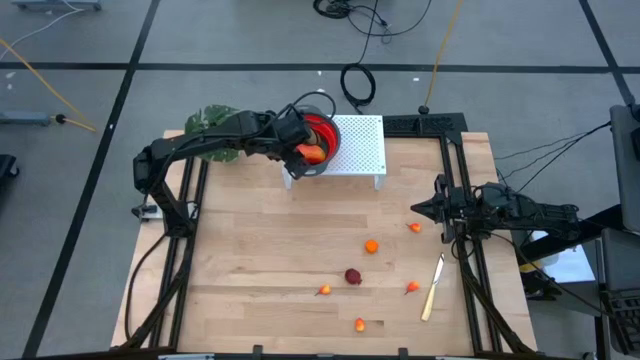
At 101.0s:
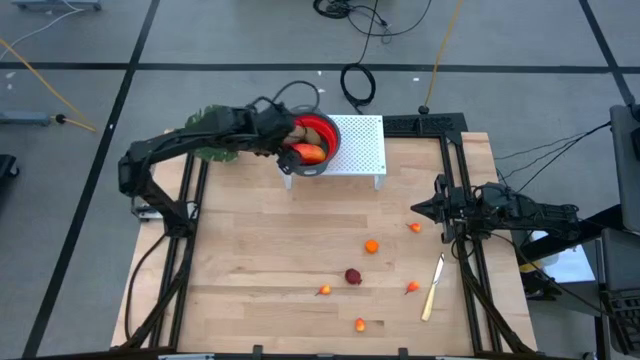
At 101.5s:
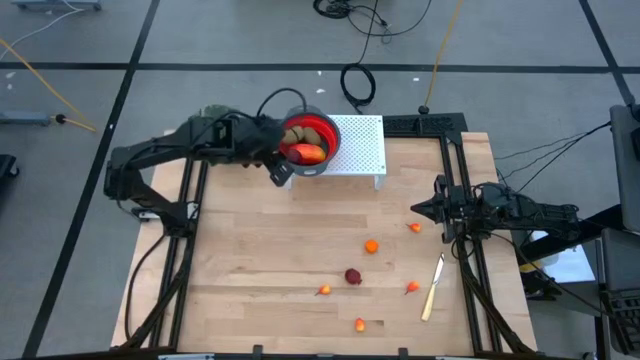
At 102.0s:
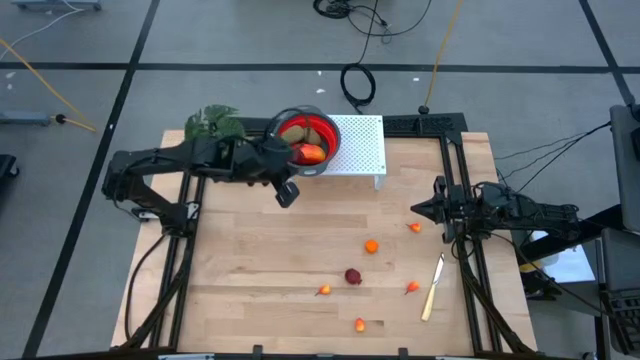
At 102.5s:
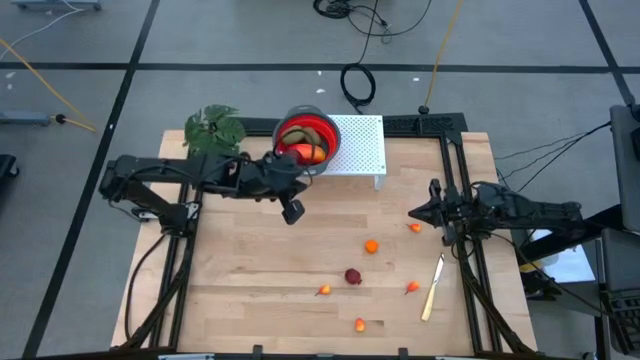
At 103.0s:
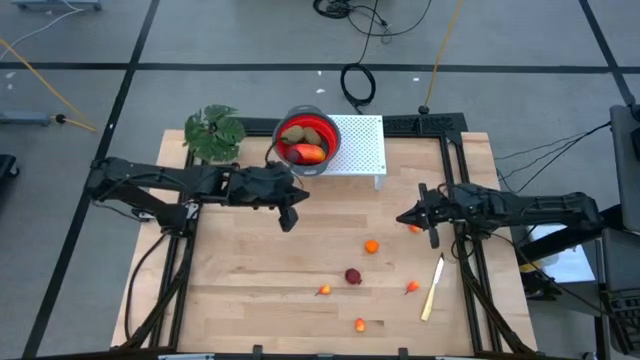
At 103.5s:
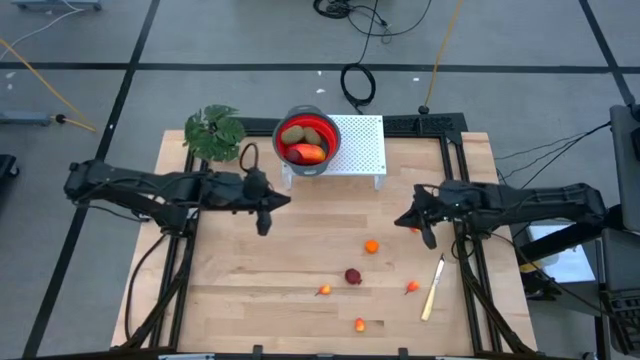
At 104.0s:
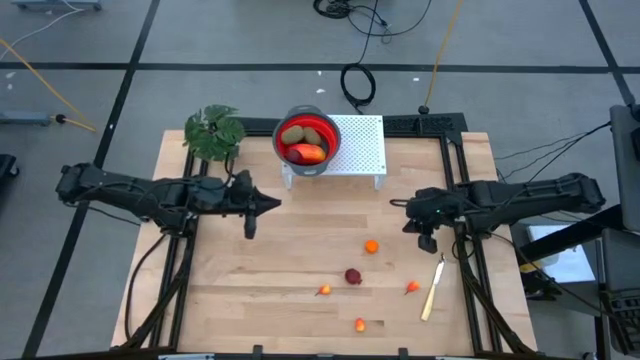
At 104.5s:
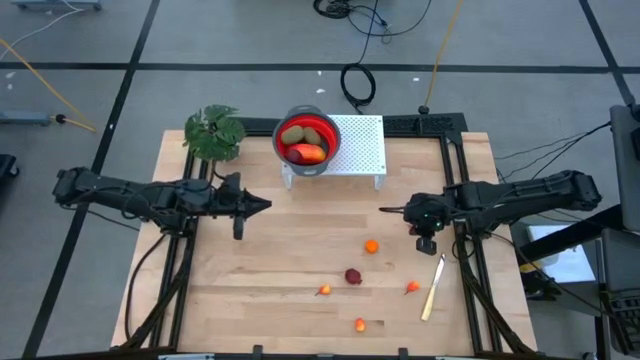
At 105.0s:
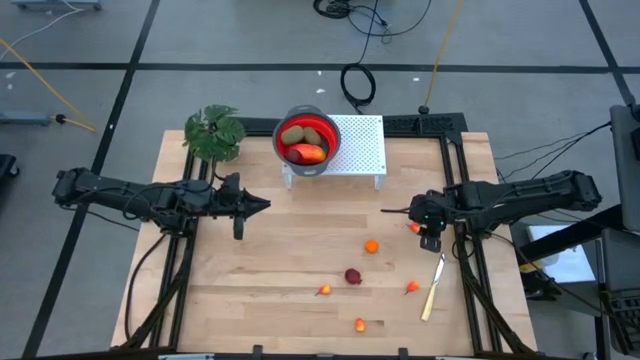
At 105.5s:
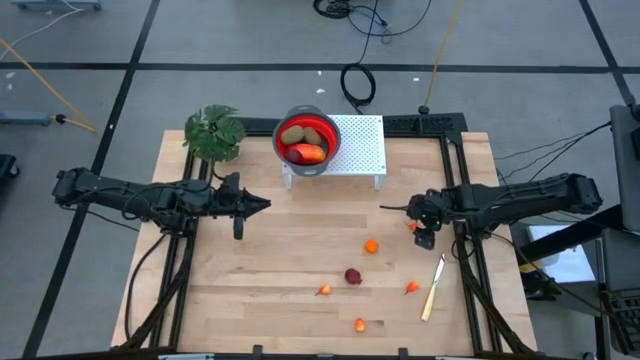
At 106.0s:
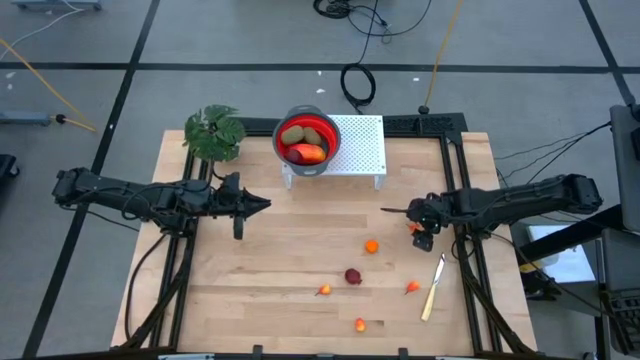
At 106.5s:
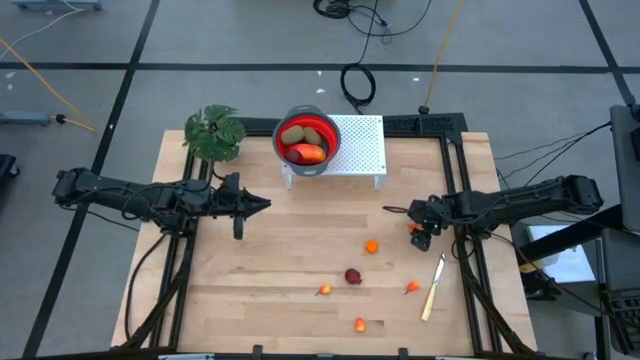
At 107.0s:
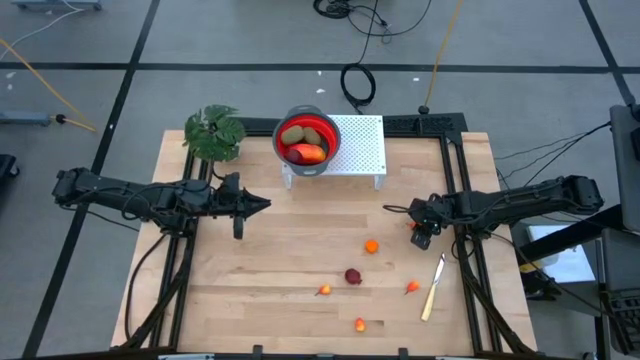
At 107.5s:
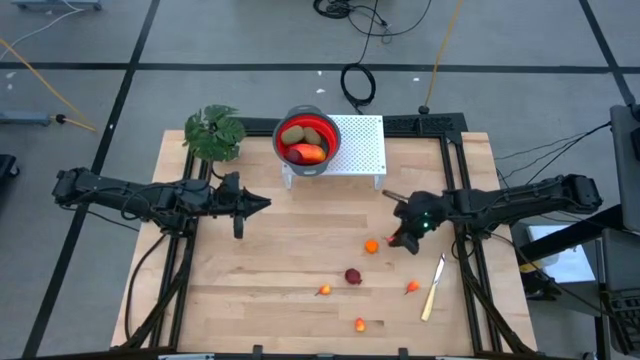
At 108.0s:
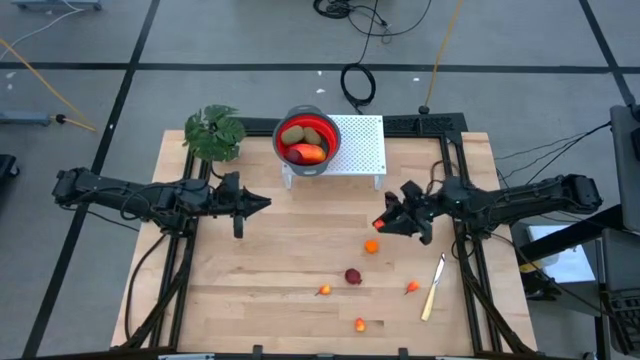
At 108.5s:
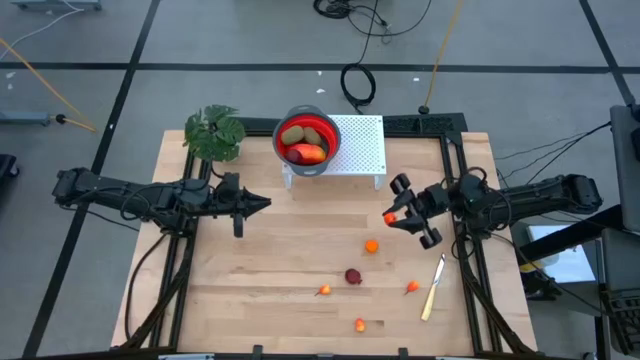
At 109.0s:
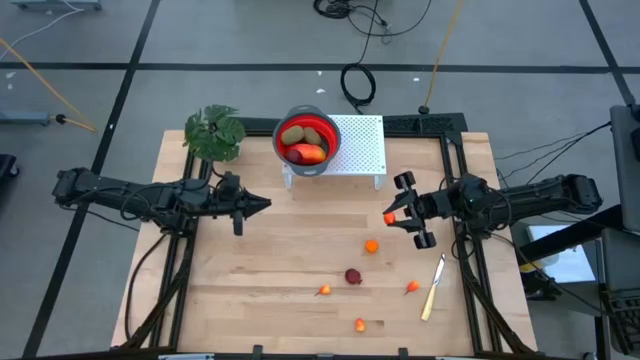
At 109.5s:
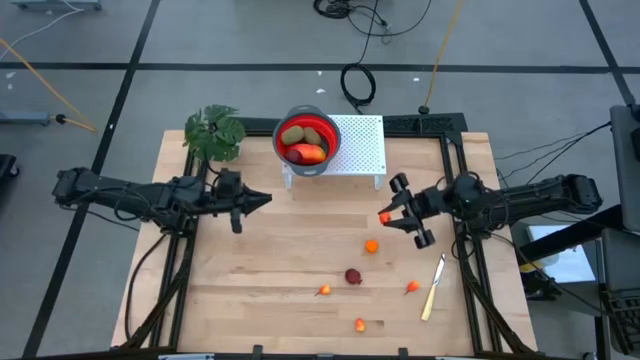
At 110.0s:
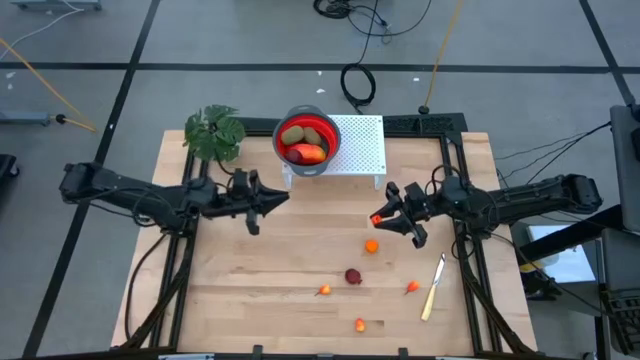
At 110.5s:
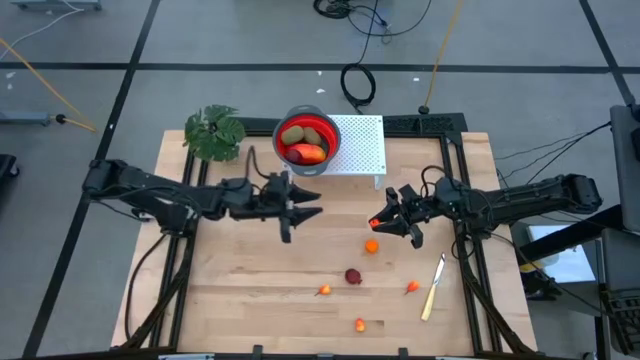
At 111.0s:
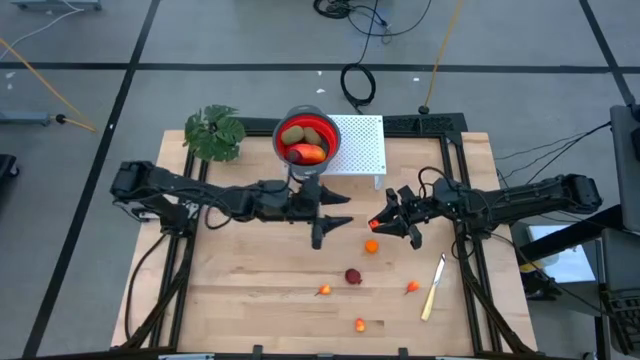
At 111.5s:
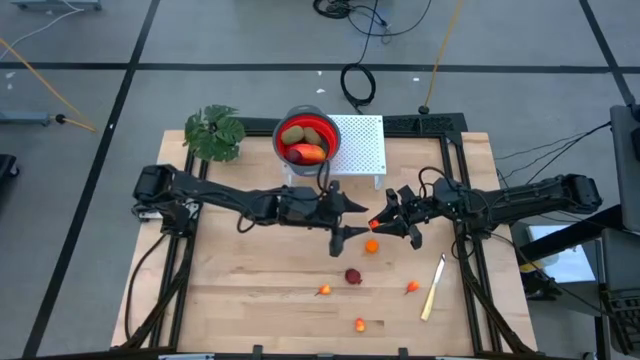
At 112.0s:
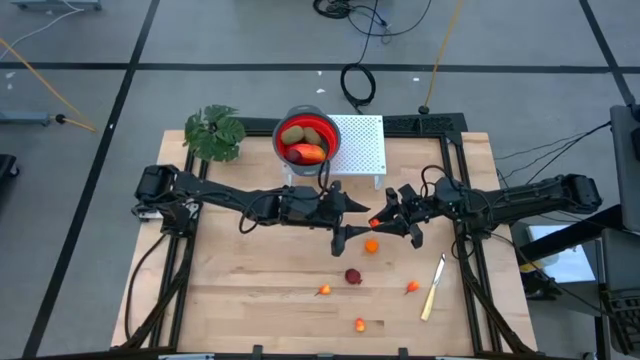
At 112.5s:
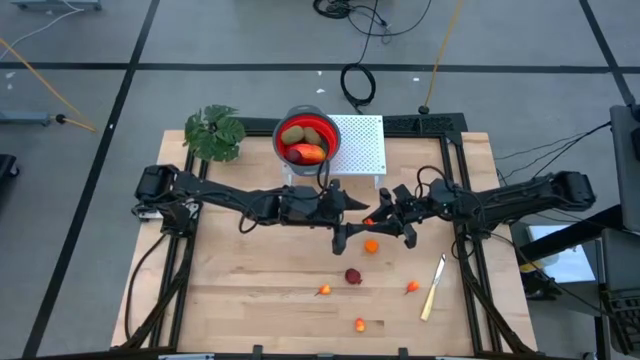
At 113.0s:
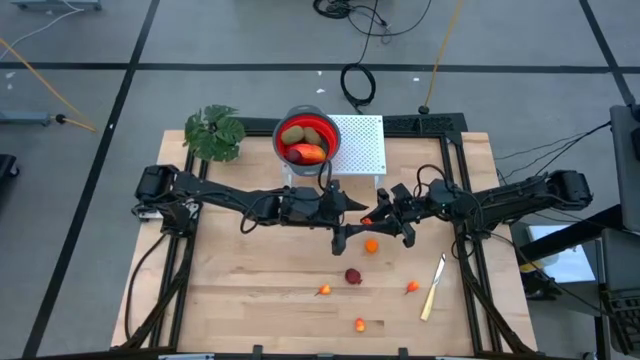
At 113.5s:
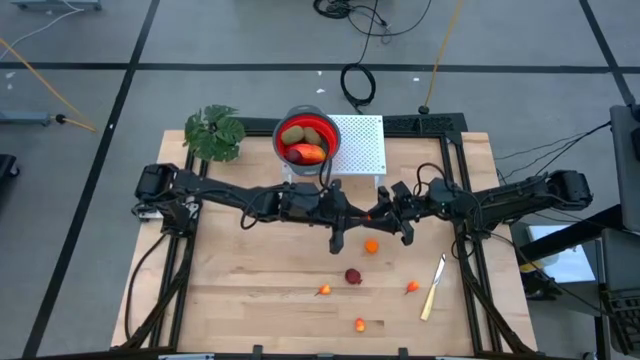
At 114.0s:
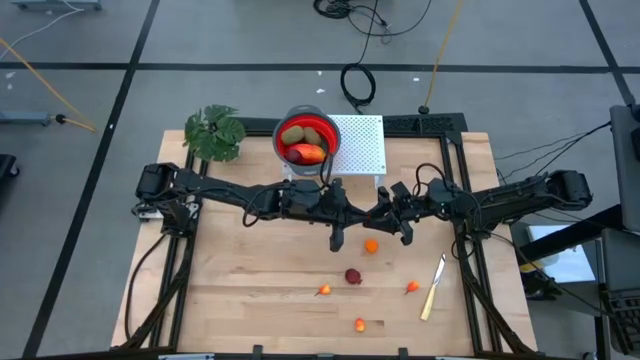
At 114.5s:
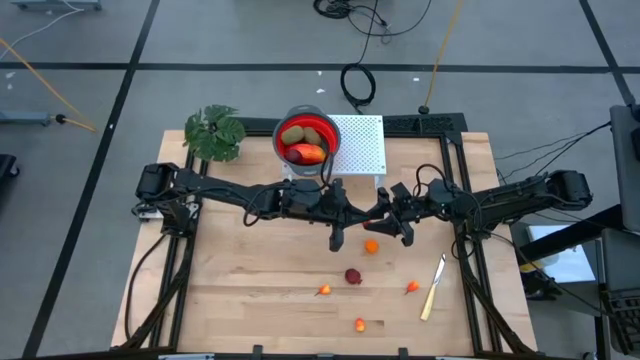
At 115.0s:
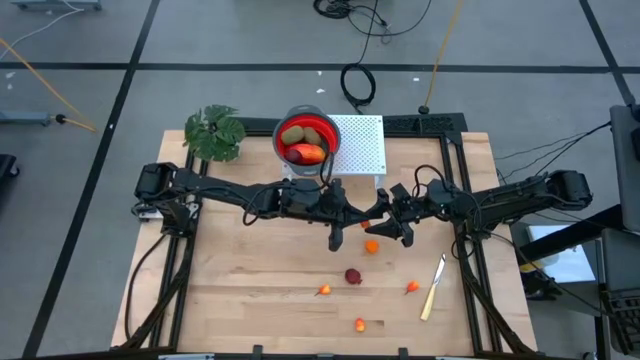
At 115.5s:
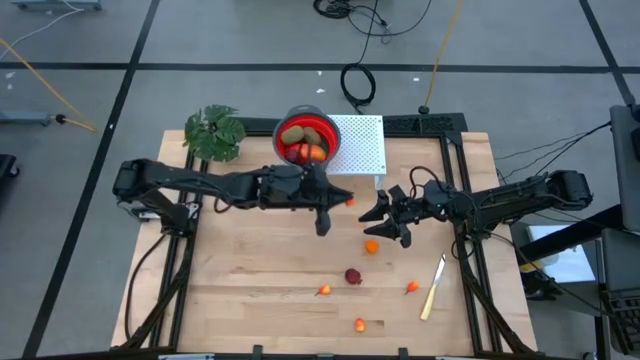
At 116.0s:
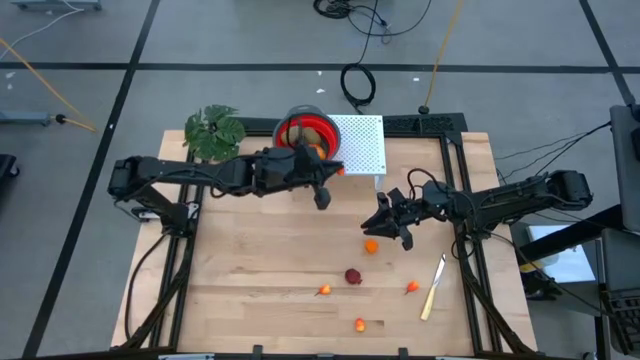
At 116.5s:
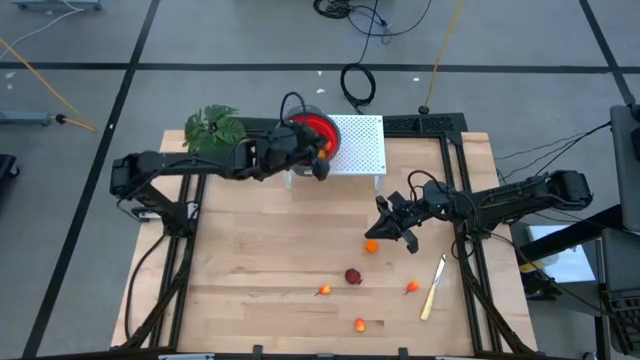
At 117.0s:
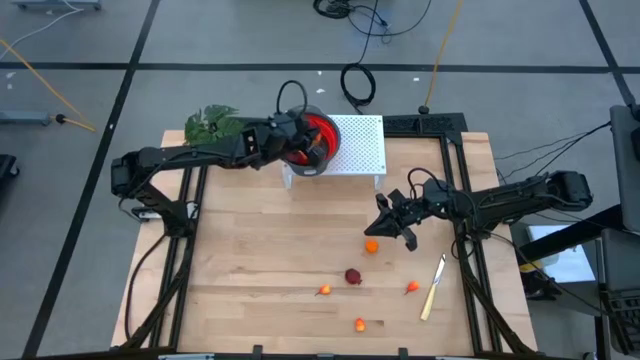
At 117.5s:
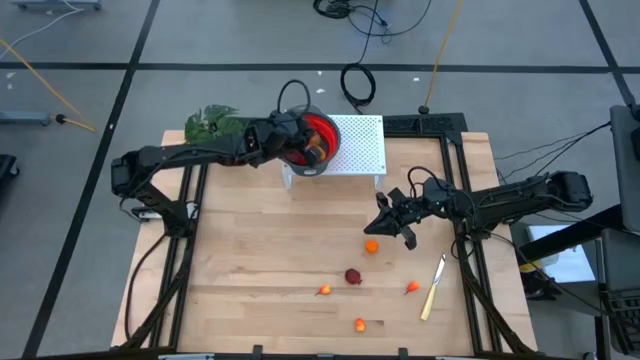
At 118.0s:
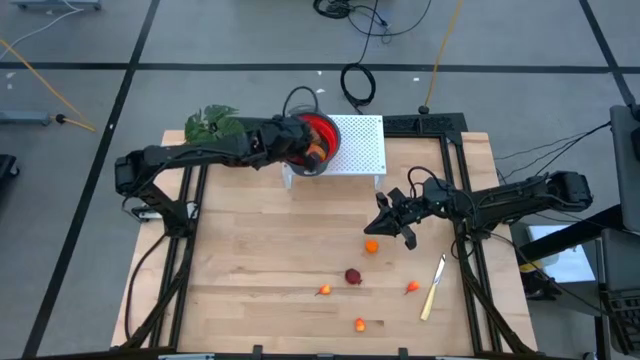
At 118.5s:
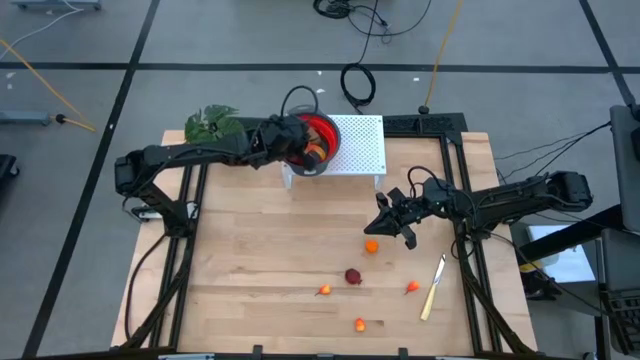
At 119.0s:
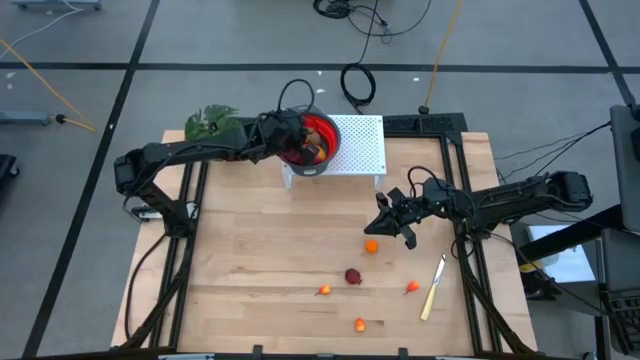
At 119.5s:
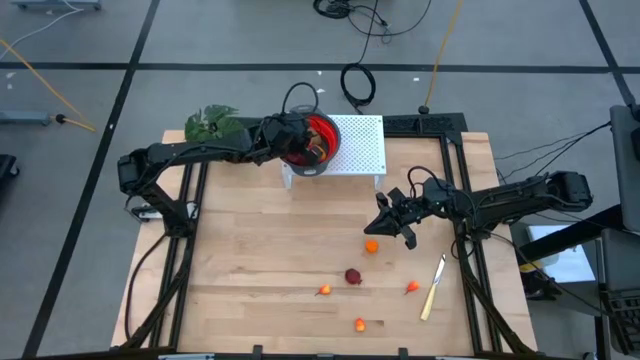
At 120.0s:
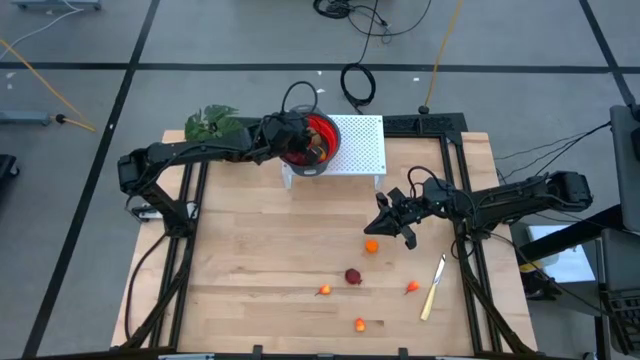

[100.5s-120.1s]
Task: Pick & Place Fruit
Put the top right peach into the red strainer bowl

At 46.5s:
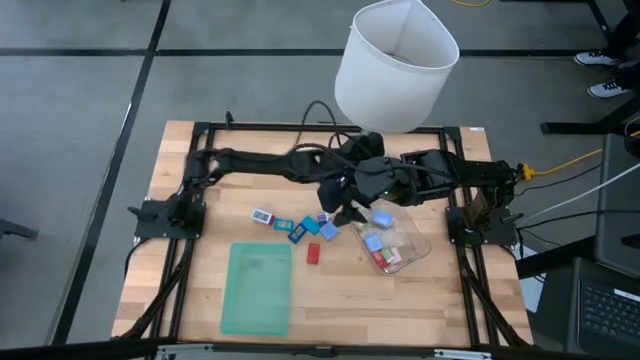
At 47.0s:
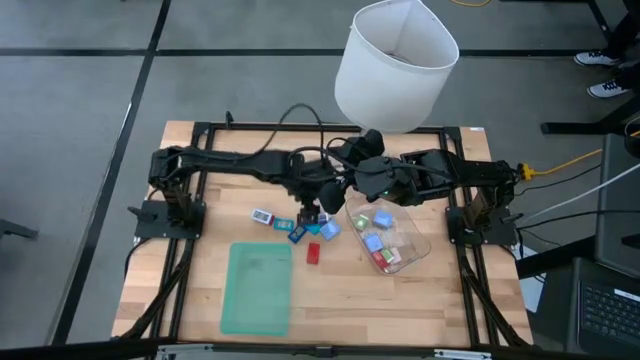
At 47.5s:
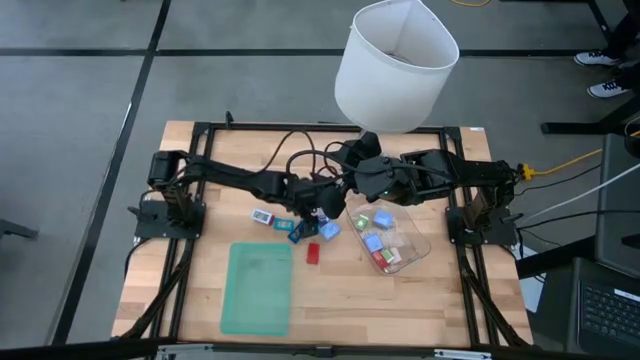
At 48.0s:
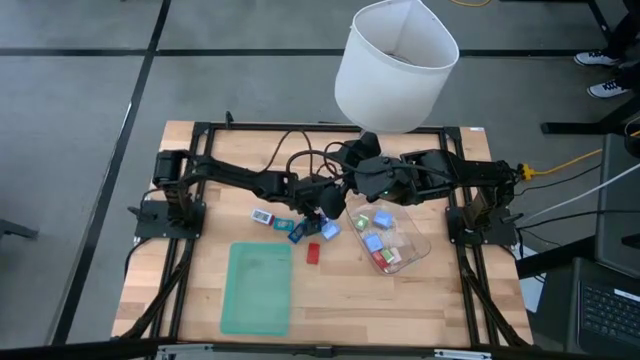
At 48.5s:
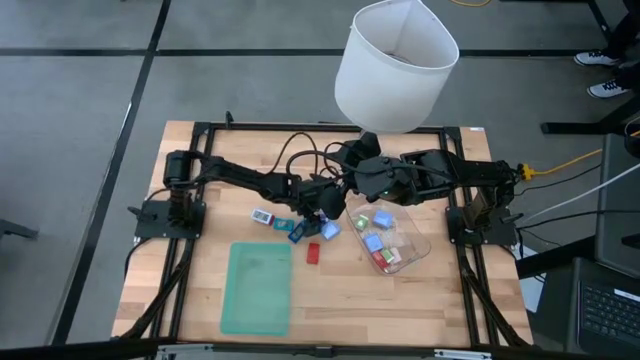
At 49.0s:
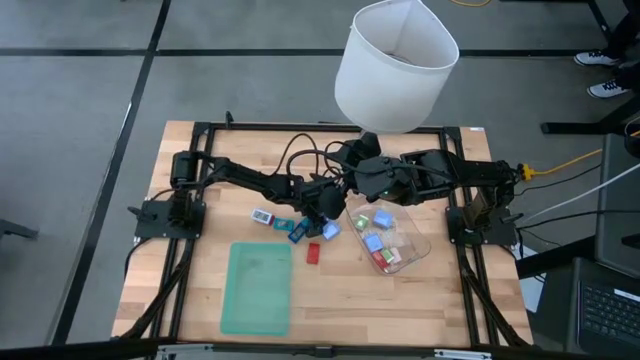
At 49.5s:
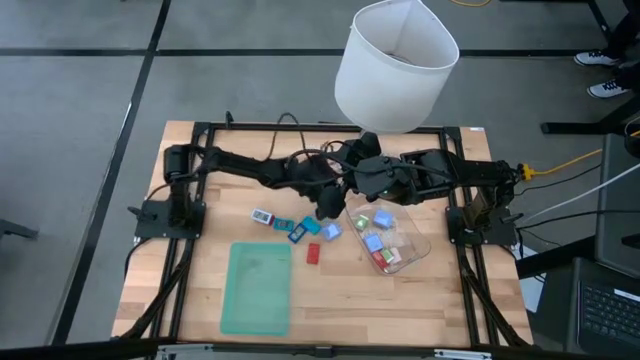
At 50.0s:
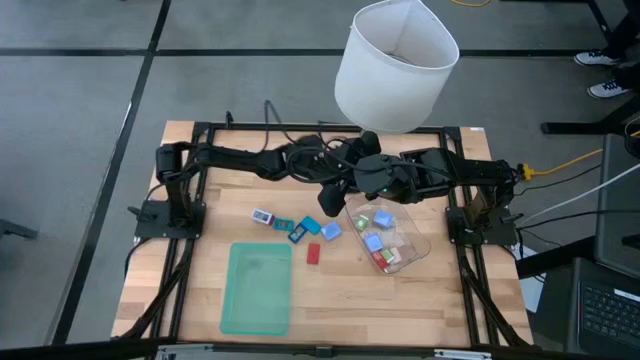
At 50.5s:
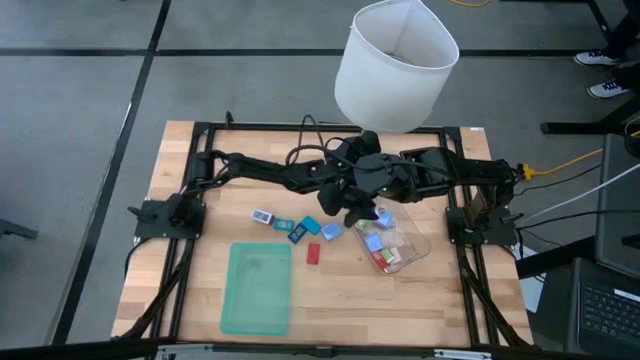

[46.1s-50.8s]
Task: Pick & Place Office items
Put the blue charger adapter into the transparent bin
